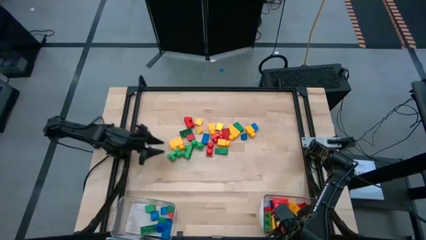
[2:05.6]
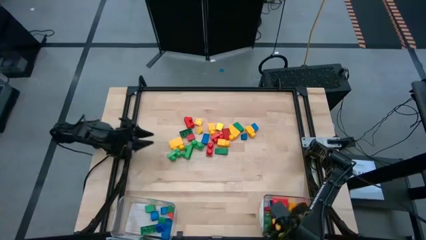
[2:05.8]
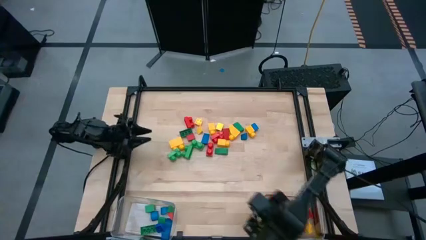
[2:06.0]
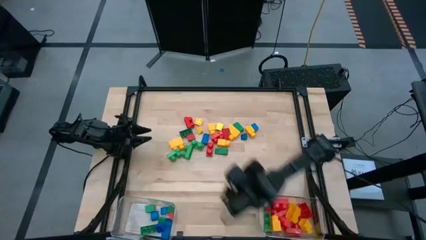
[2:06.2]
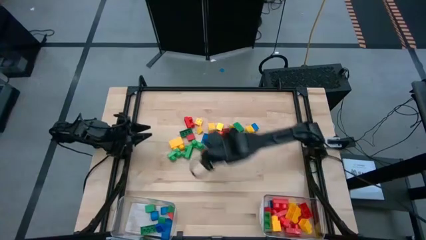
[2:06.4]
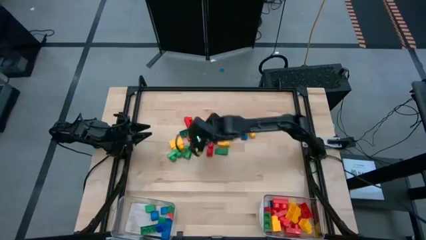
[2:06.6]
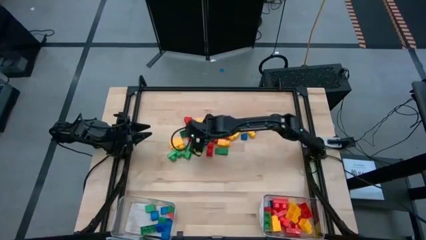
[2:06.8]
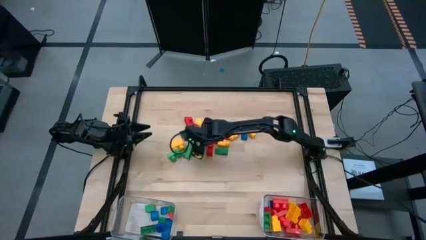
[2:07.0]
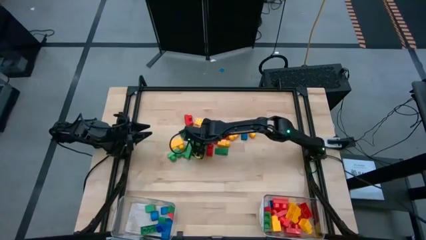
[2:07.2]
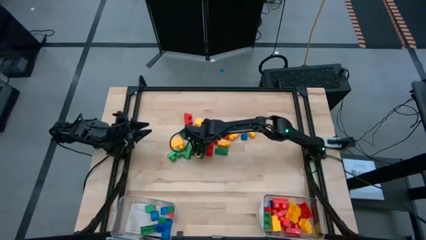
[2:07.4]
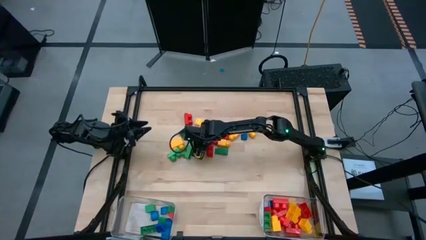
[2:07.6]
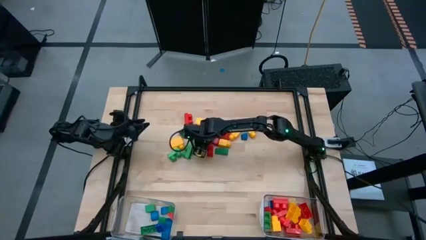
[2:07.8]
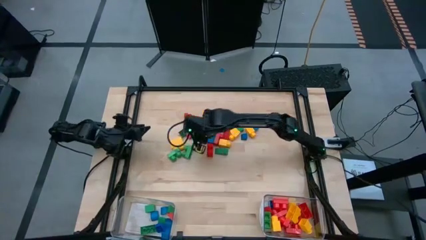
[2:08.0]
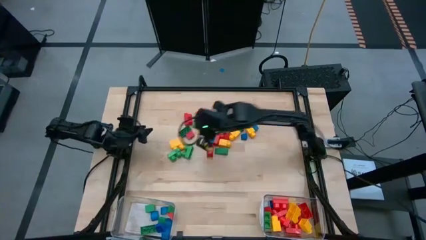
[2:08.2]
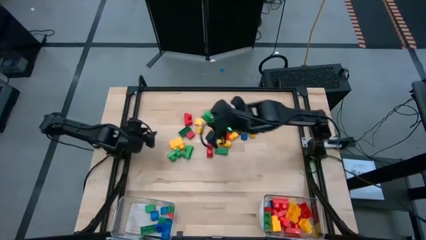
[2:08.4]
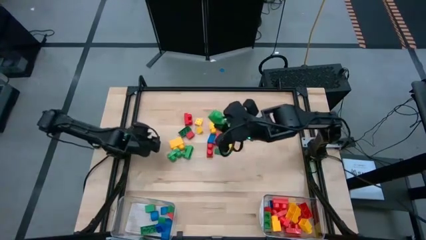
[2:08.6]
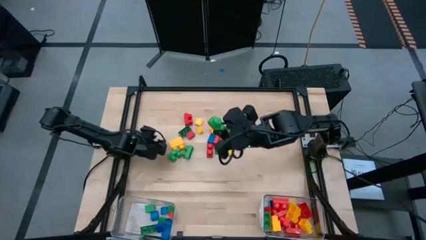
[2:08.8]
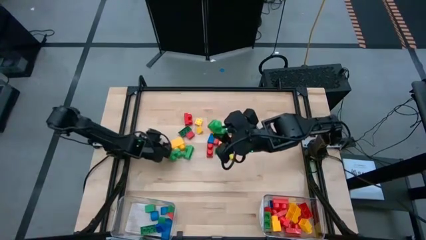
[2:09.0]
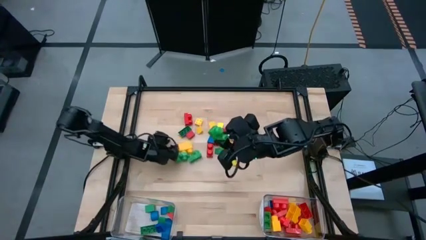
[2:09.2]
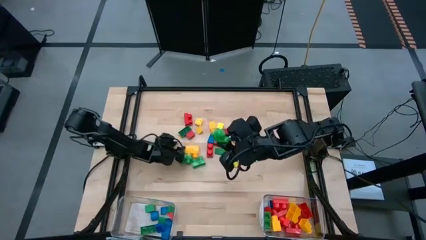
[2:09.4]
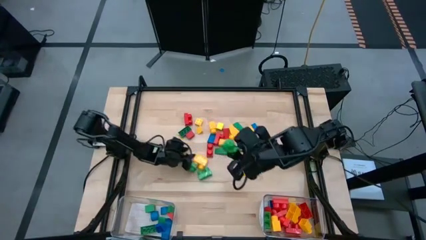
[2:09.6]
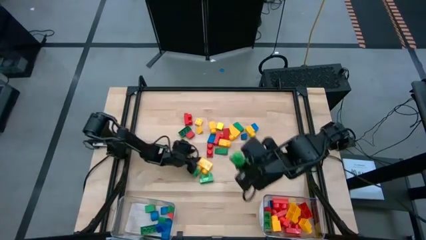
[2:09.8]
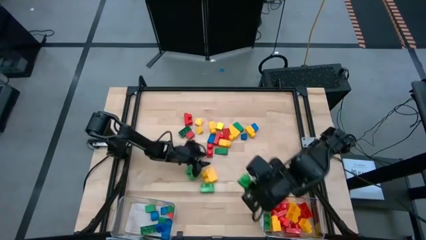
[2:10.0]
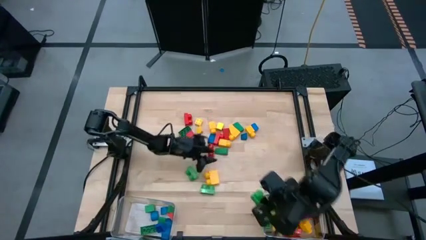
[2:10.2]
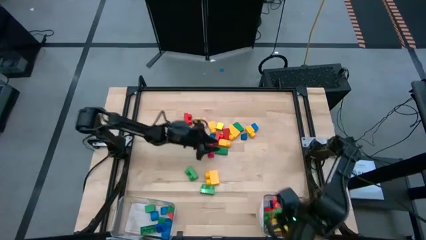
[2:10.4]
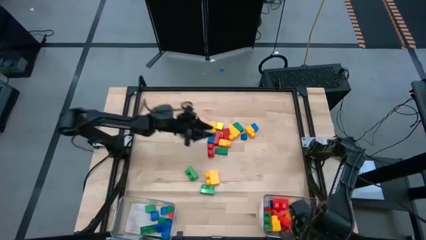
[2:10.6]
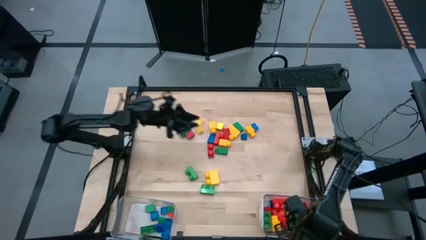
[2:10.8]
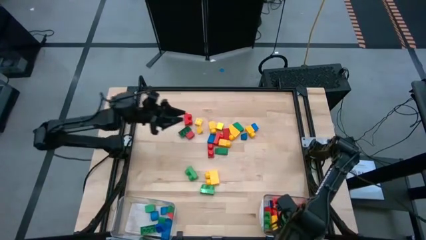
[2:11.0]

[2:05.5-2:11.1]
Task: Sort blocks by size
Put the green game piece into the right transparent bin

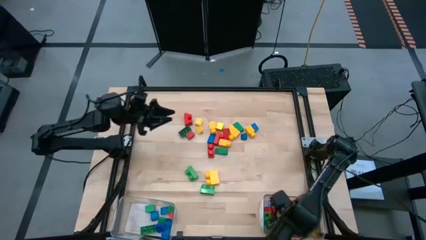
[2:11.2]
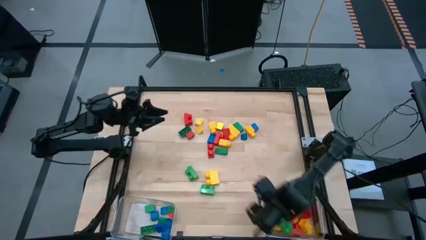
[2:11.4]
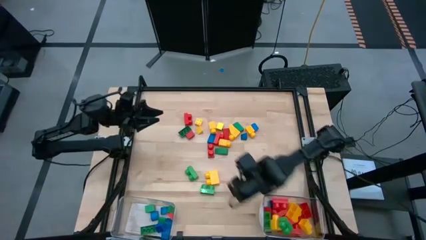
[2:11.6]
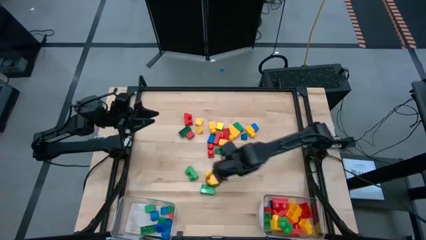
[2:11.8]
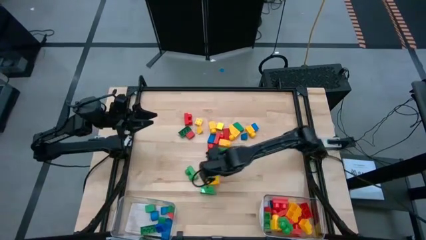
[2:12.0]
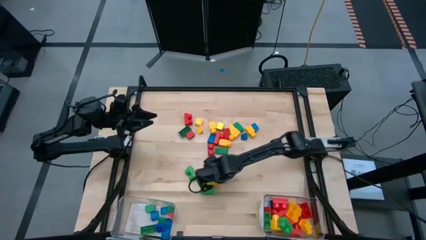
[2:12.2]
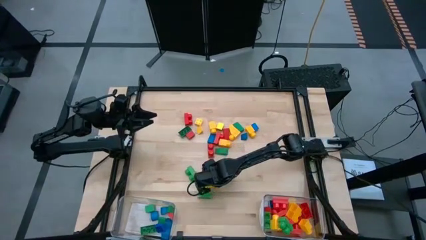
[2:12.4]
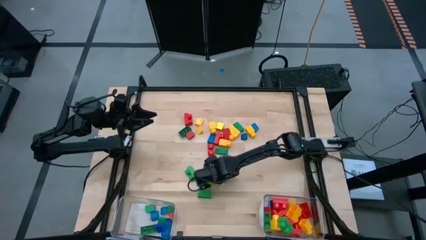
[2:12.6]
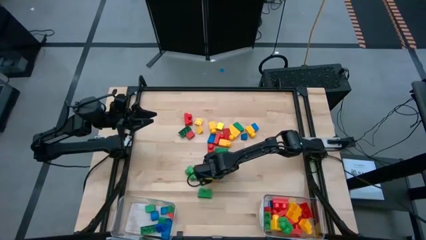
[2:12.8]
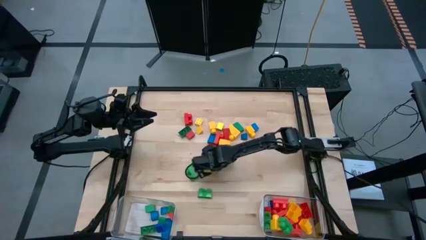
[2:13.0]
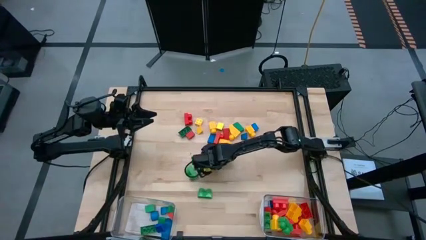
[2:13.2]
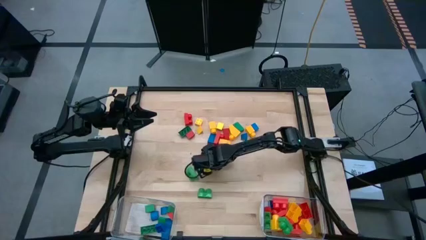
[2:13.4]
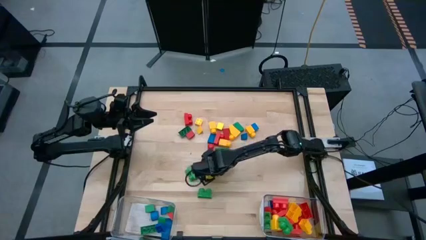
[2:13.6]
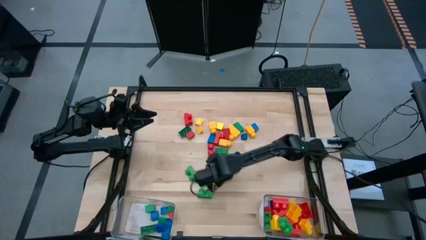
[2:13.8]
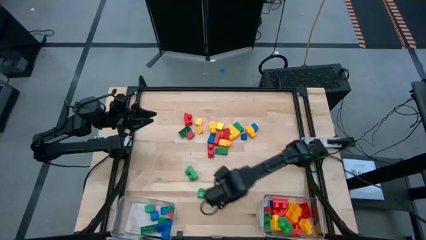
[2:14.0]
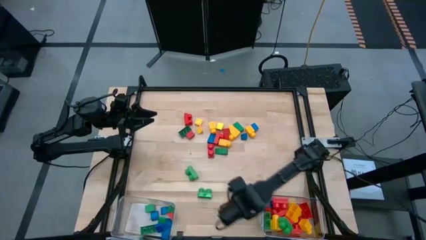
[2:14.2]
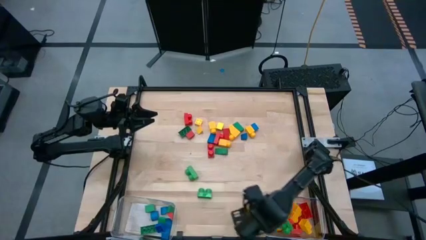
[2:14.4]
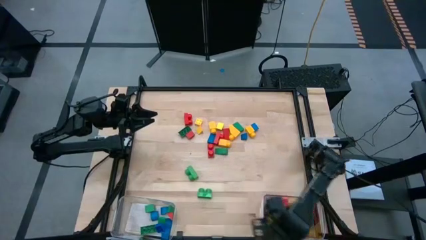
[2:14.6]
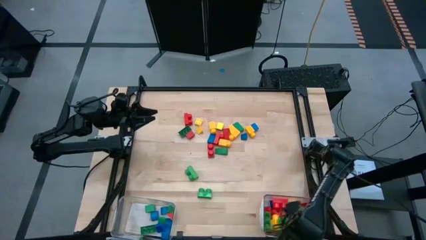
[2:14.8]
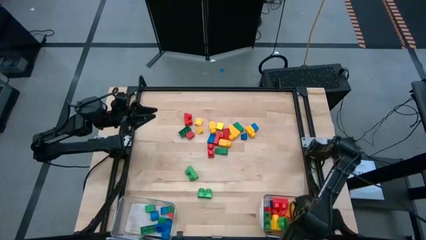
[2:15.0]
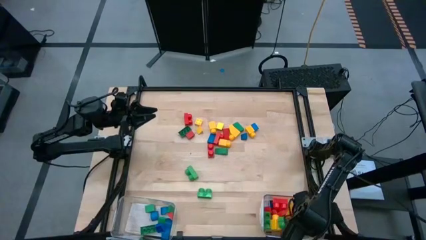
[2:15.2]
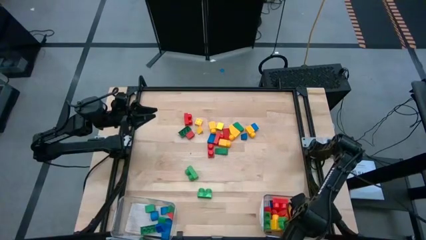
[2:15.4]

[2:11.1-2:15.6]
Put the yellow game piece into the right transparent bin

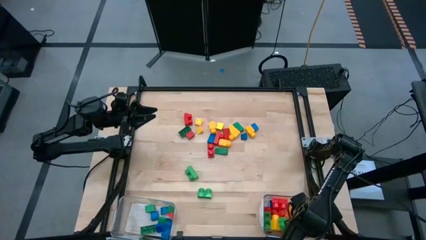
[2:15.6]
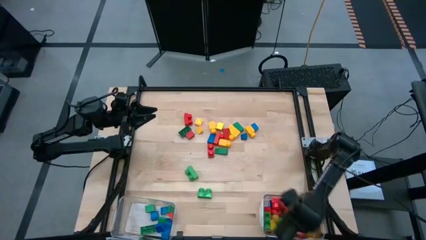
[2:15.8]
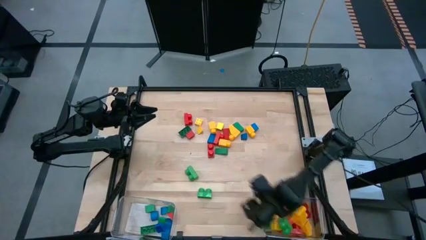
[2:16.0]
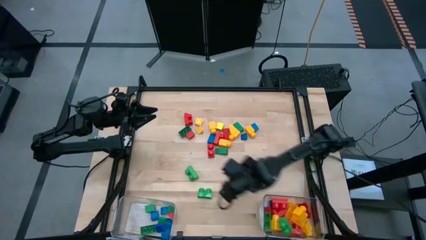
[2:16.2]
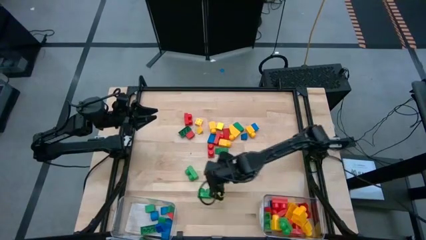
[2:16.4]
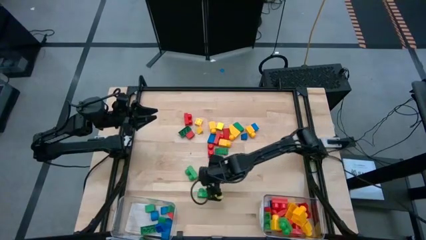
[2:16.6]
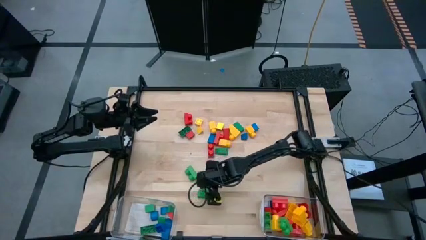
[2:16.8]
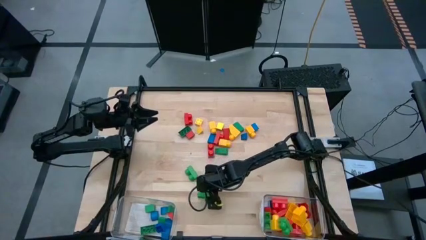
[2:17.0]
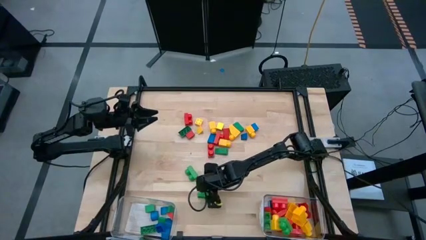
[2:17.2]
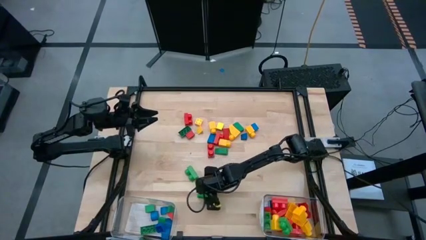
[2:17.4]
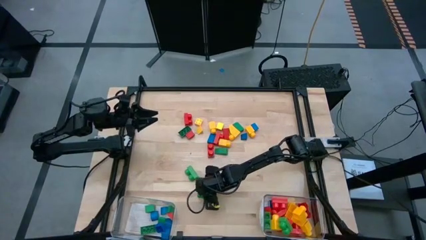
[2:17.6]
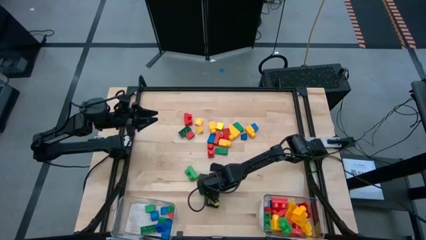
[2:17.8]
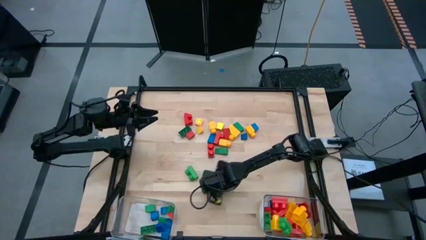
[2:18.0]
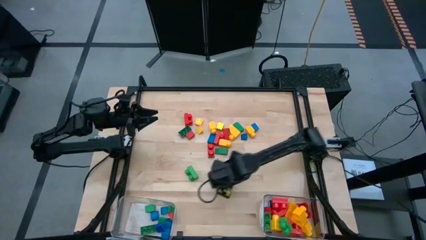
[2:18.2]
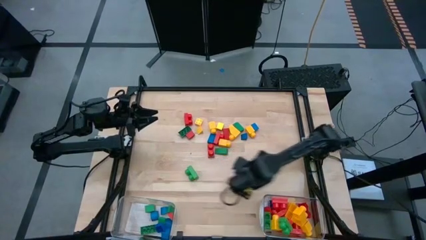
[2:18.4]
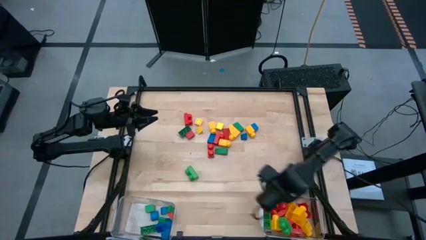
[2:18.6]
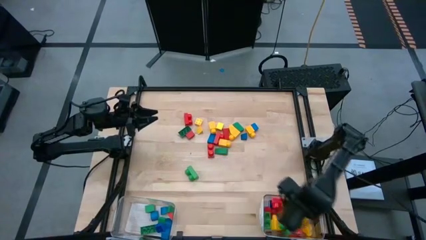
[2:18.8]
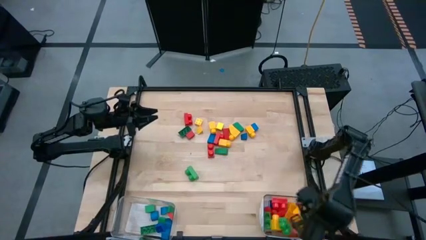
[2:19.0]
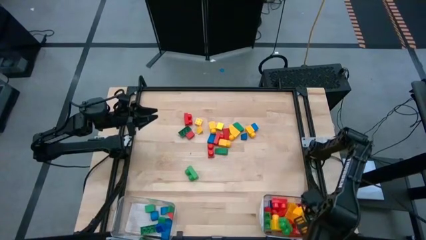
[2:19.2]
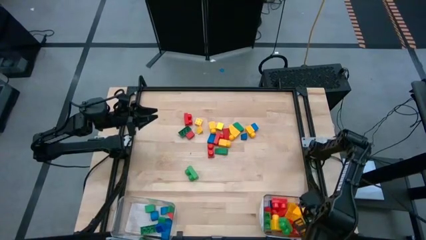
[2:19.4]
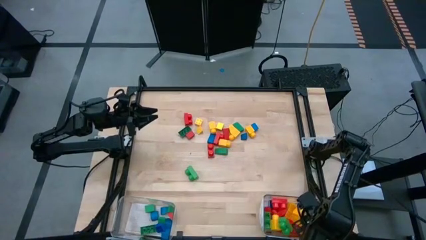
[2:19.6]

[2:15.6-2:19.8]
Put the green game piece into the right transparent bin

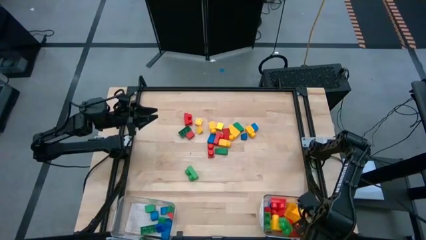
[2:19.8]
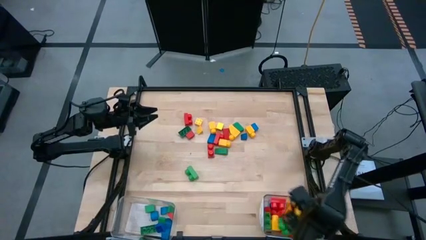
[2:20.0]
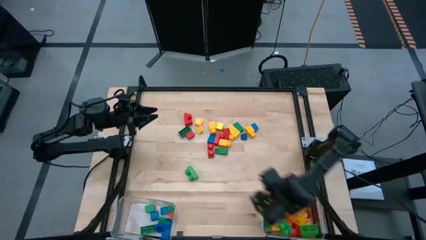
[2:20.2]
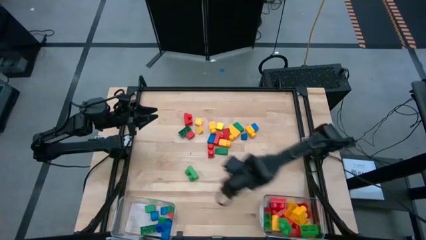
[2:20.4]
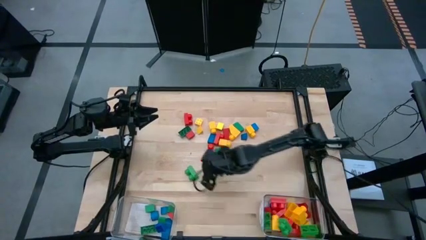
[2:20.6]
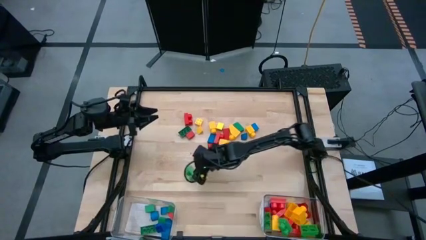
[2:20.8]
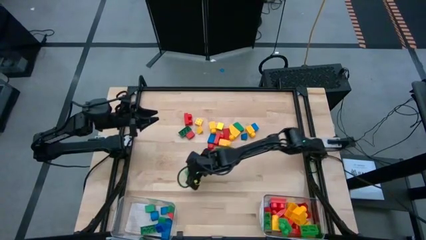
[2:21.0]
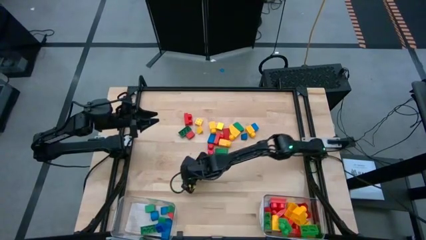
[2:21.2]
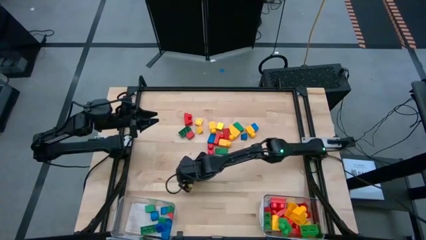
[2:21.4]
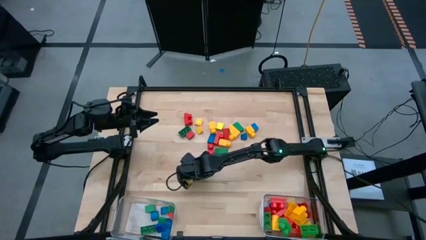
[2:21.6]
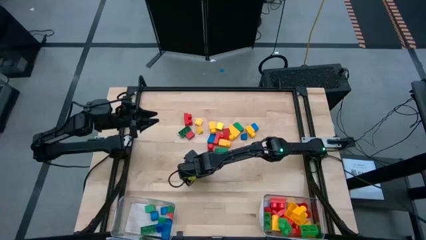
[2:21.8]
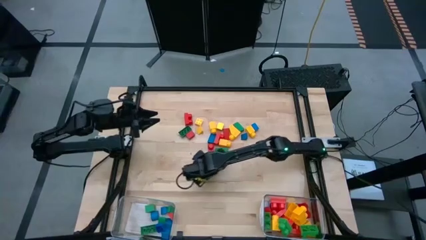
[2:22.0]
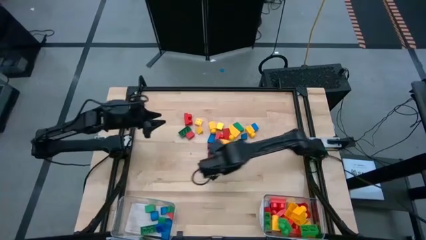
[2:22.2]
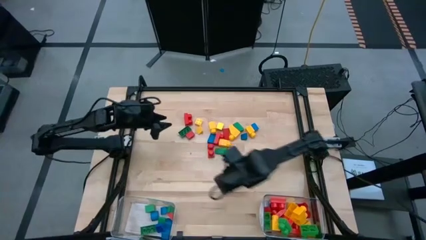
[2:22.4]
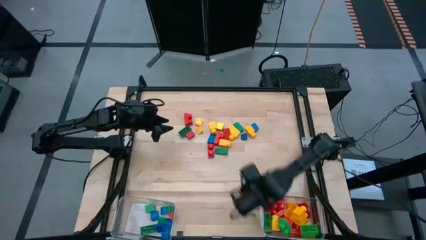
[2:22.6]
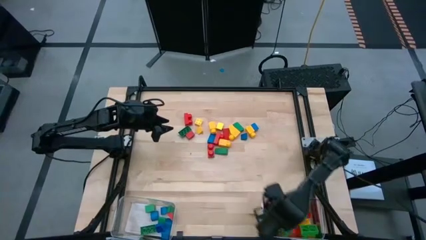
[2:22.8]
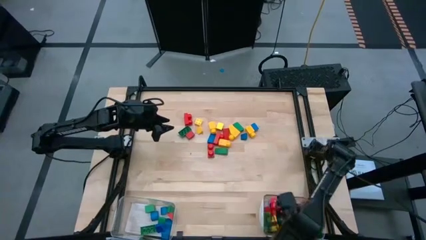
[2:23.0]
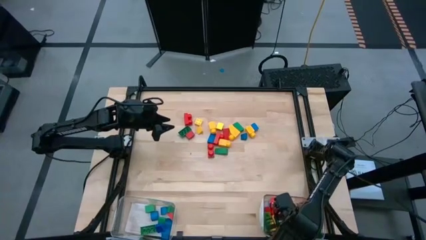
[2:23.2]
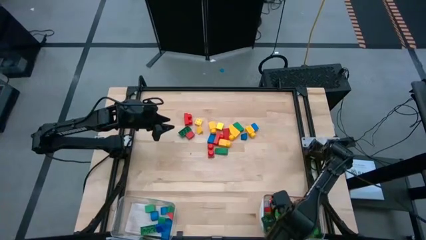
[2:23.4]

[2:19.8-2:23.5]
Put the green game piece into the right transparent bin
